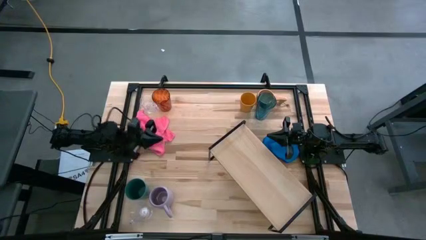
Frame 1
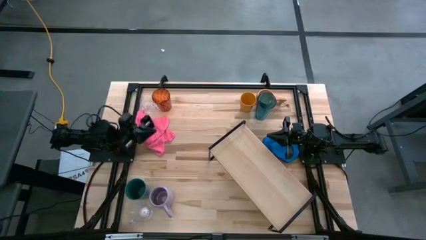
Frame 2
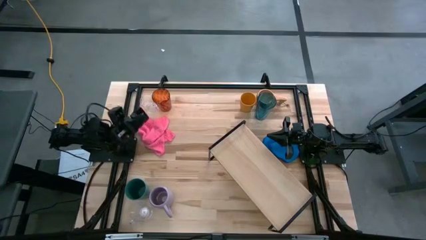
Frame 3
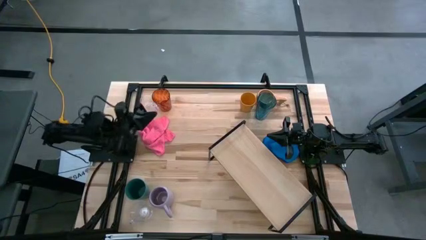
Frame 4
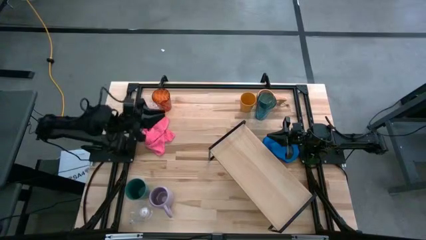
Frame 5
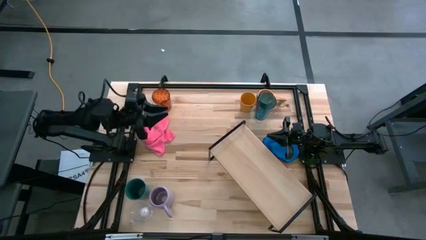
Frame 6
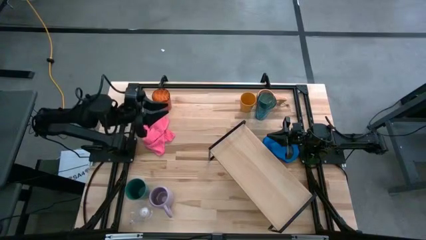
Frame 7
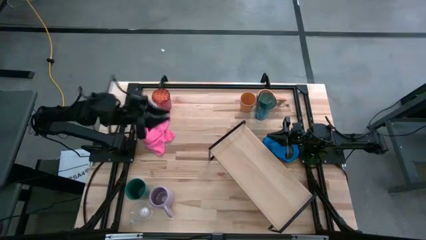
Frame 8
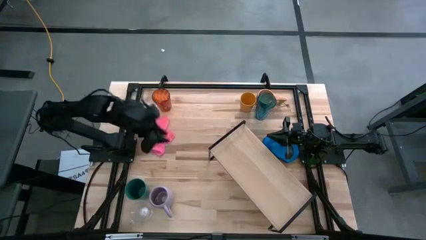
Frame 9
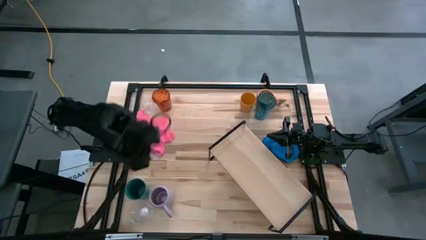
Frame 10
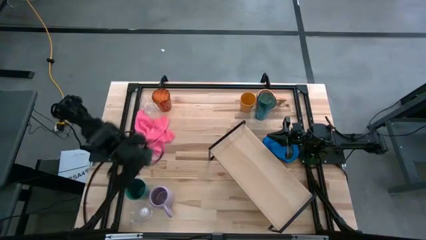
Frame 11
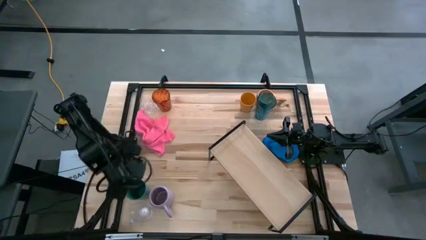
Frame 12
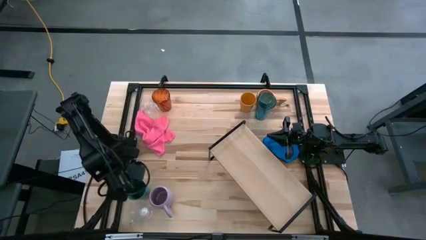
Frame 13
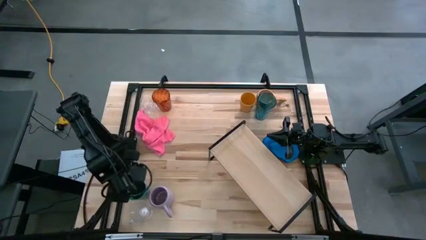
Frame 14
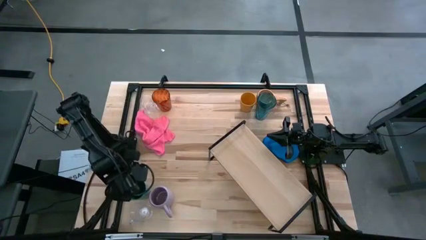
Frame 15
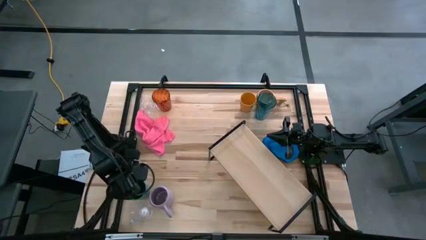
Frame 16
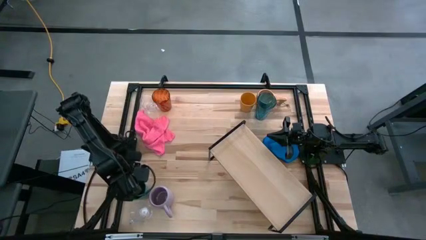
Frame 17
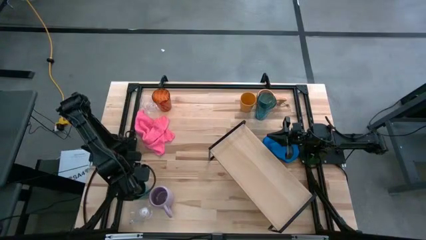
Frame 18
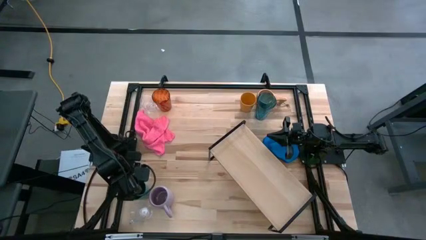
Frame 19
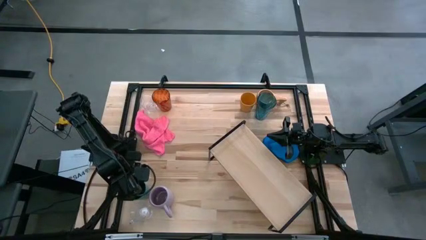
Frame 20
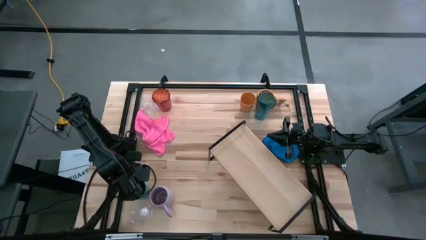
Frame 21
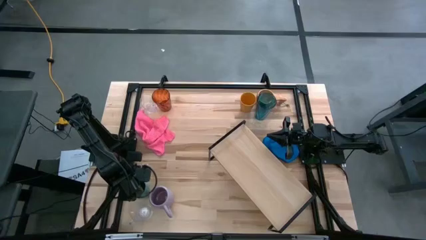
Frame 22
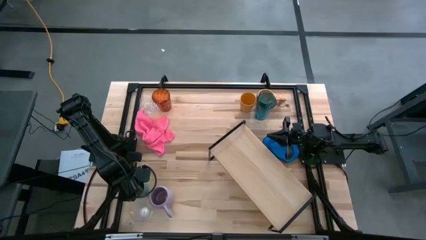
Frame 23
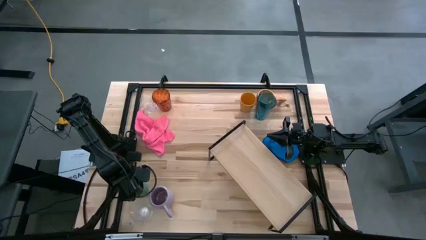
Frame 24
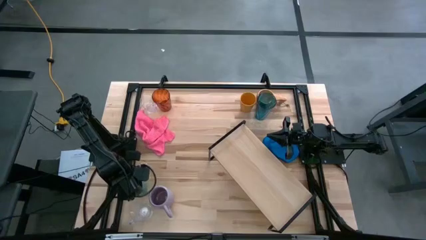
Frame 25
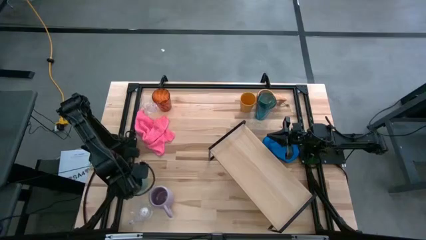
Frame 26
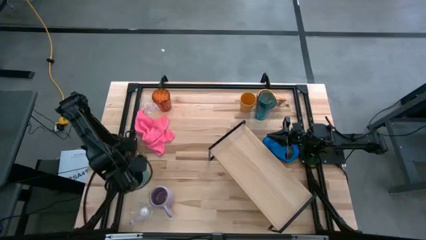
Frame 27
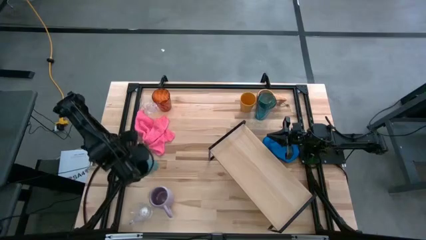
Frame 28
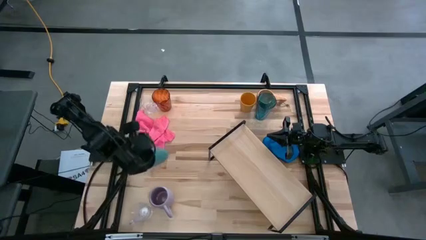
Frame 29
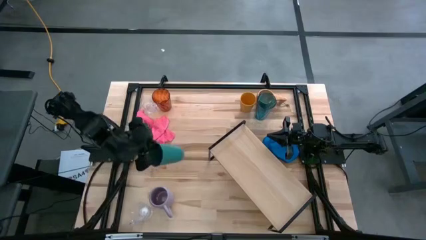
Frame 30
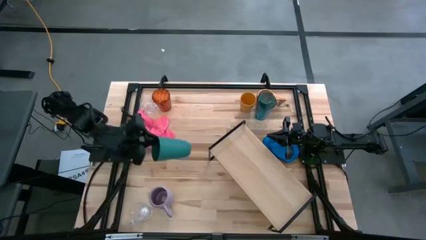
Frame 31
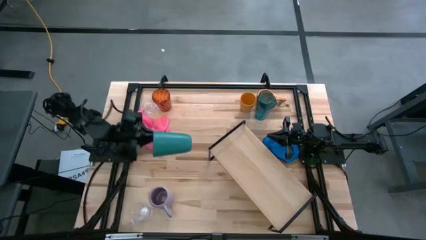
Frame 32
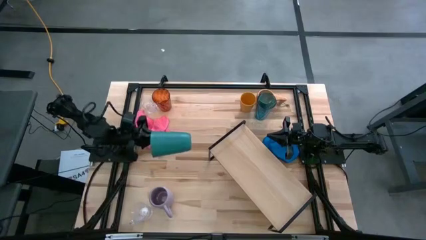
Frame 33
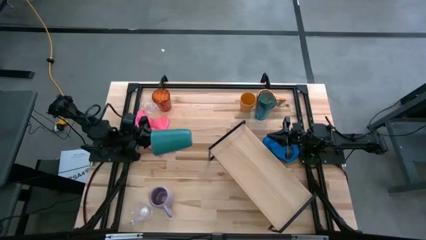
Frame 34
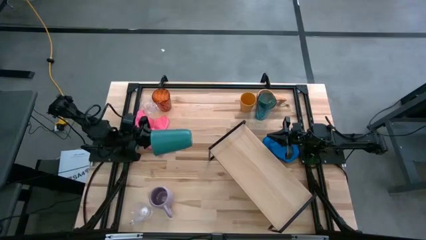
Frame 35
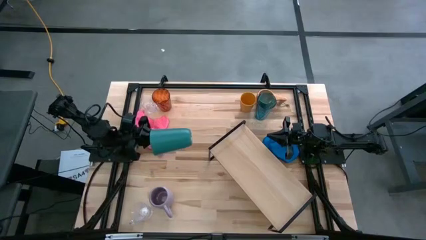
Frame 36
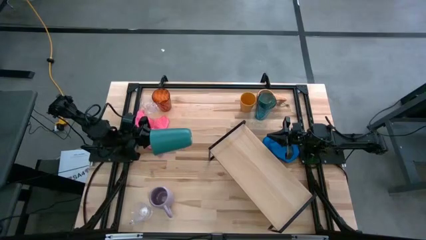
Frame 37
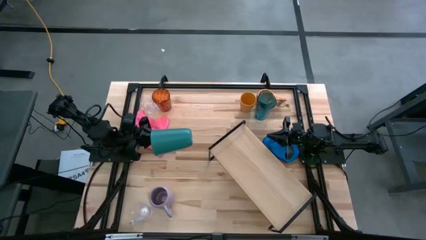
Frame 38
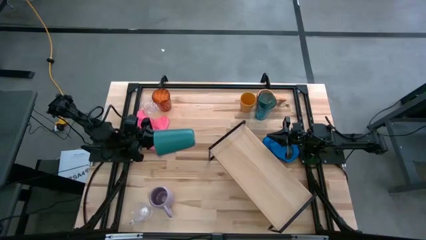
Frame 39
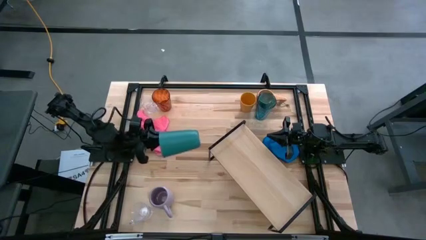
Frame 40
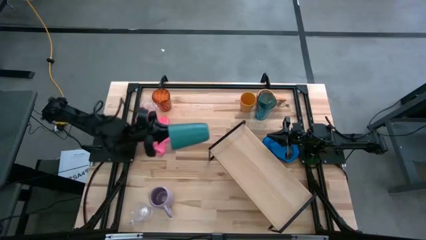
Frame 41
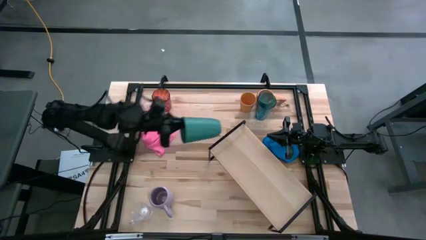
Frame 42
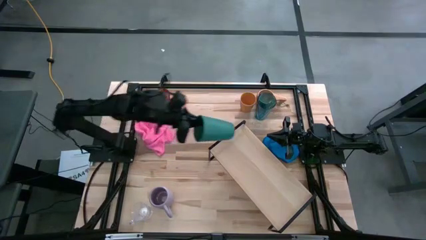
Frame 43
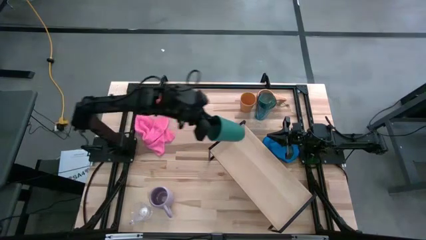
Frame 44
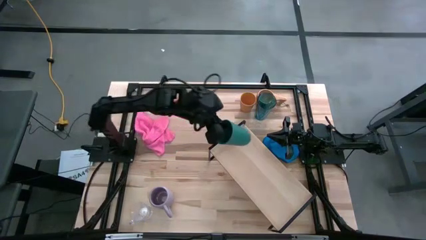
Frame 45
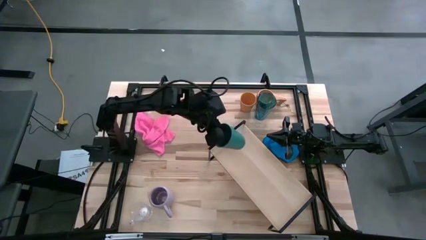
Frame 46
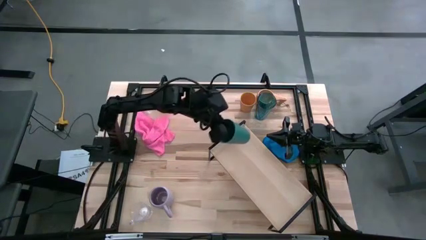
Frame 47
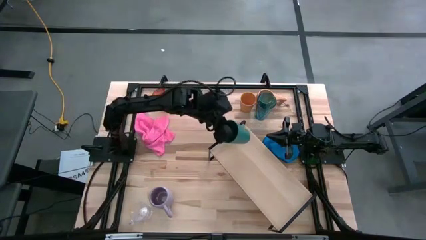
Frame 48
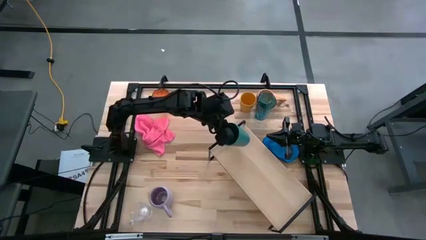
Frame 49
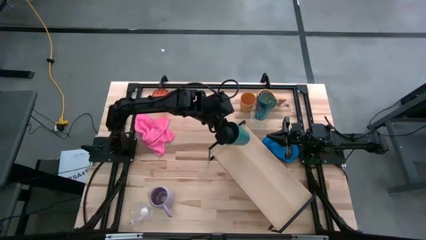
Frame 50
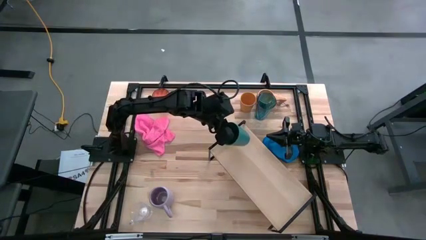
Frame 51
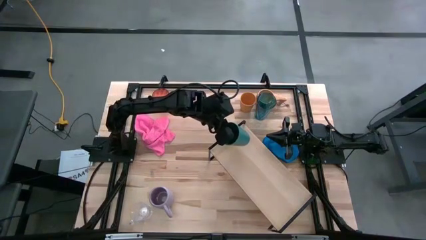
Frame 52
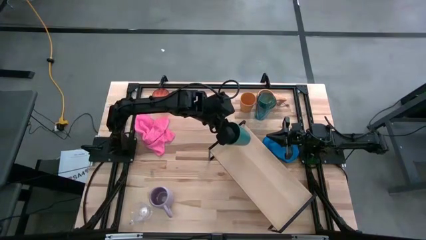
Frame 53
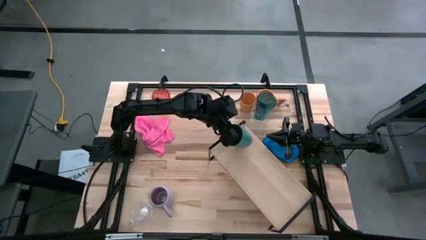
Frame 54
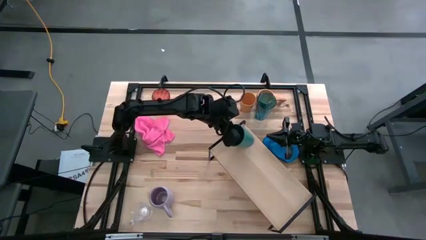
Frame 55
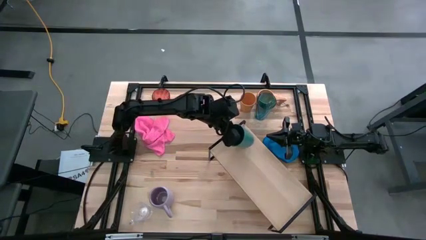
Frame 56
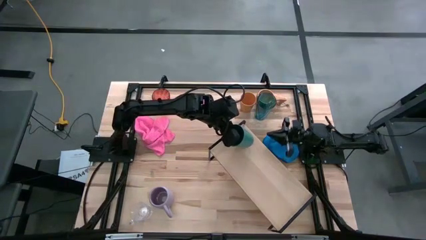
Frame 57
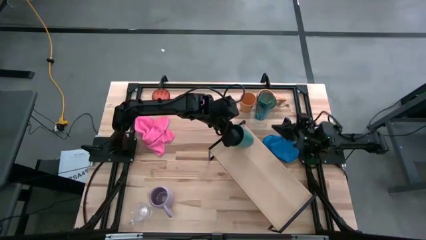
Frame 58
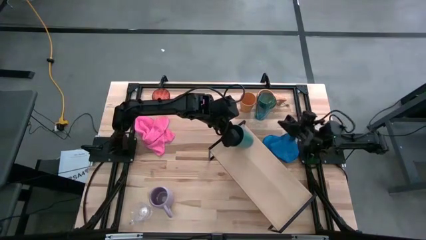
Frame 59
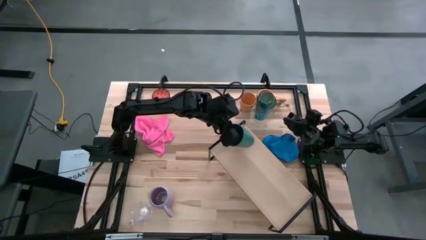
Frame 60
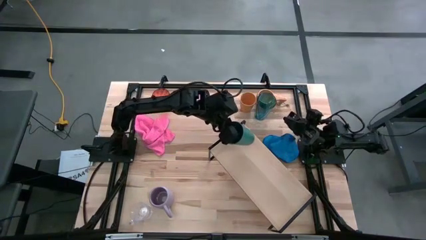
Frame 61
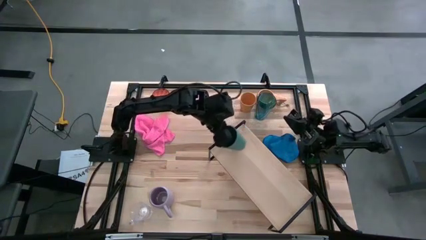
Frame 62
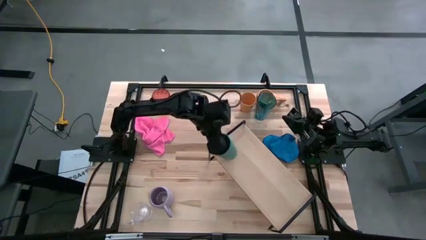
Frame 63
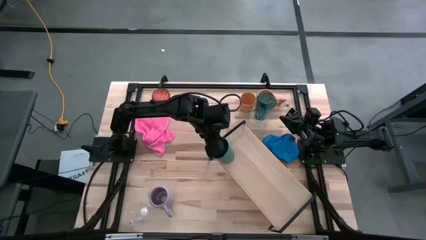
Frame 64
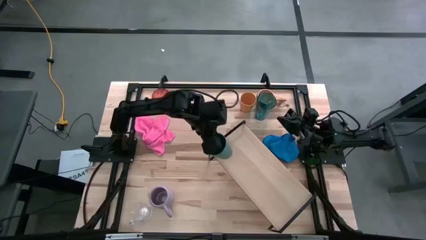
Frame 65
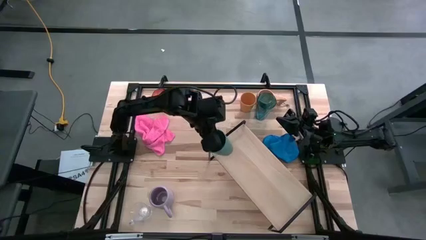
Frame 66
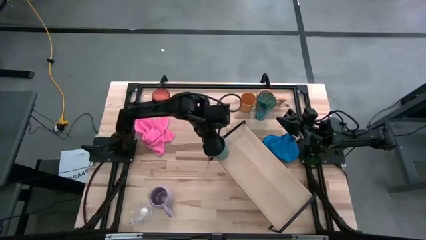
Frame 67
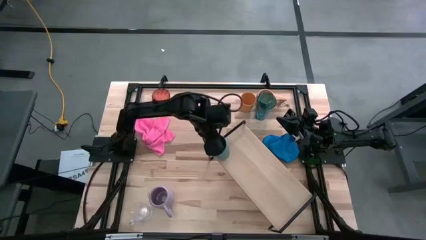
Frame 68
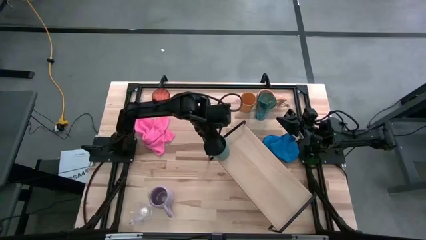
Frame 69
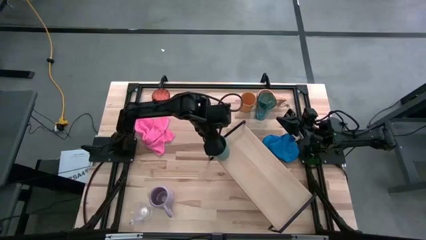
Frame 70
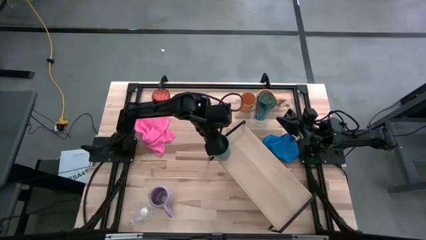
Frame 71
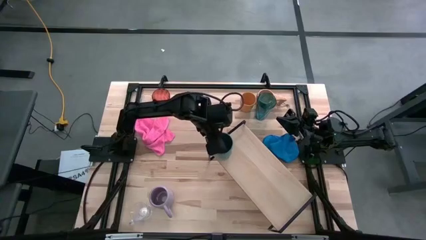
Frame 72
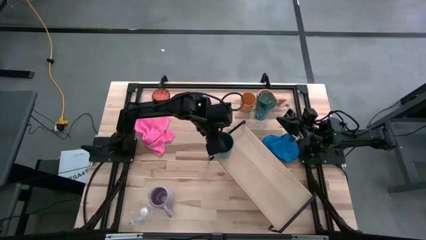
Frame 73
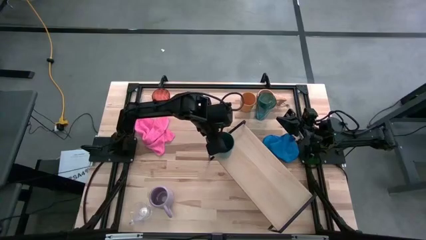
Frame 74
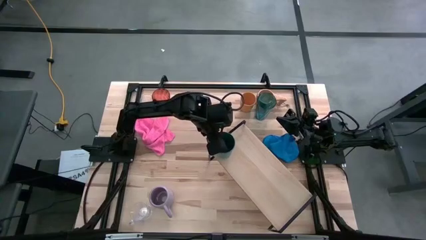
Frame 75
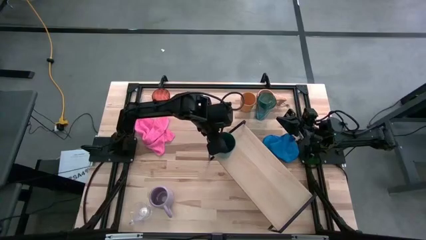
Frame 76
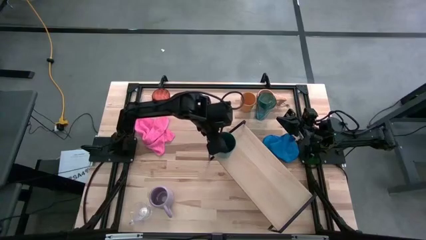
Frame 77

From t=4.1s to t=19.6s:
Task: Stack small to large cups/mugs on shelf
Put the green cup on the shelf
